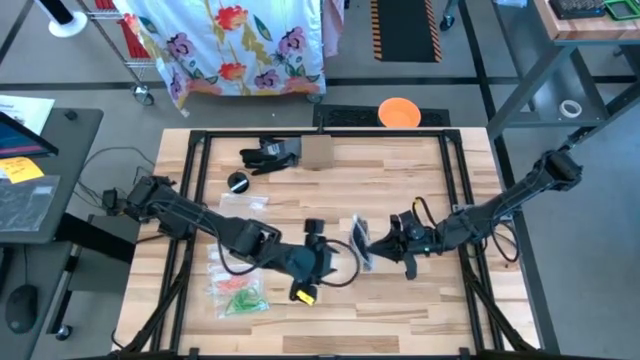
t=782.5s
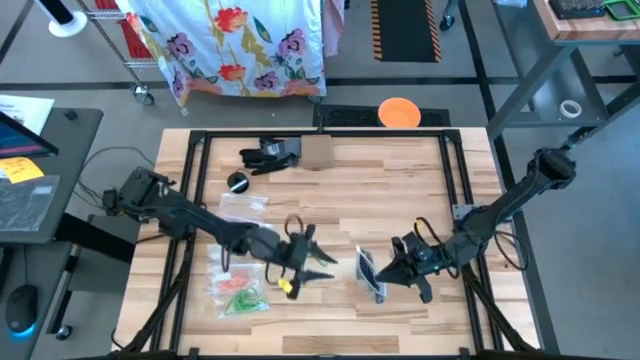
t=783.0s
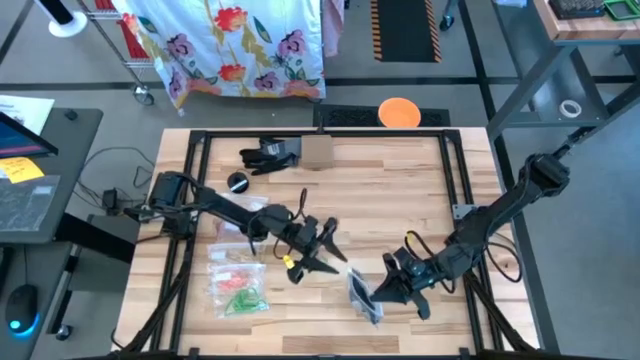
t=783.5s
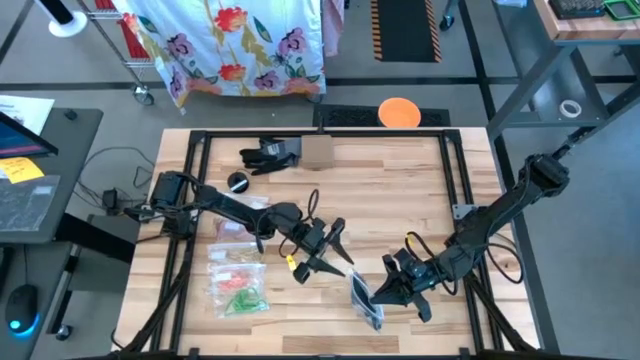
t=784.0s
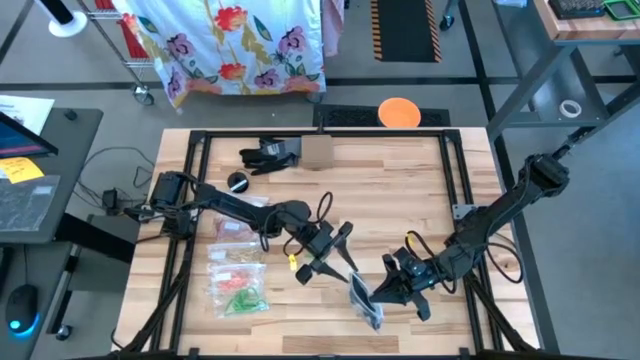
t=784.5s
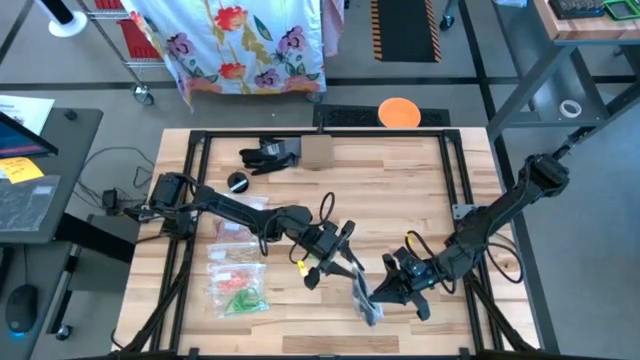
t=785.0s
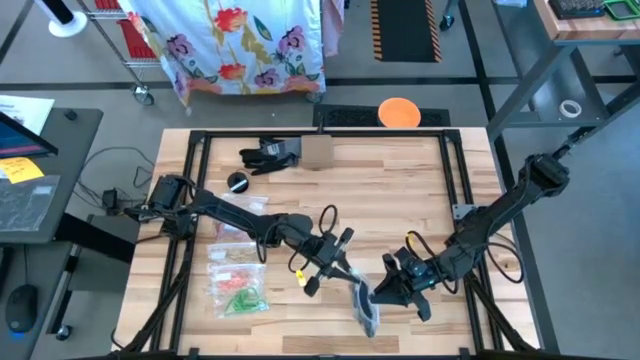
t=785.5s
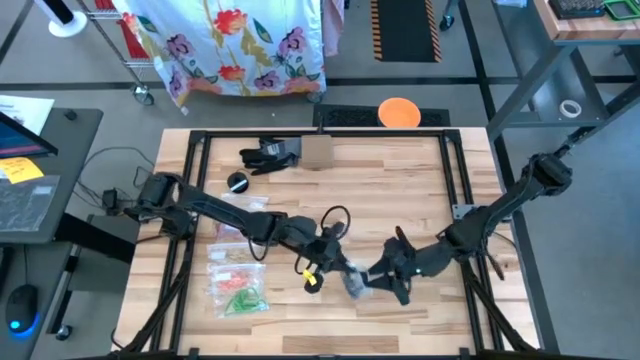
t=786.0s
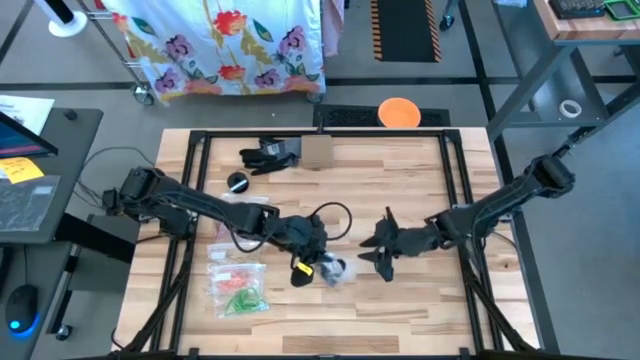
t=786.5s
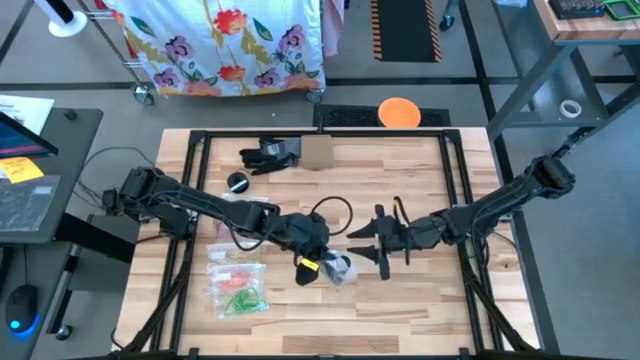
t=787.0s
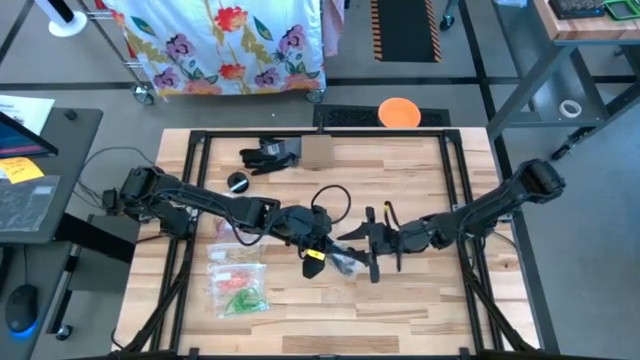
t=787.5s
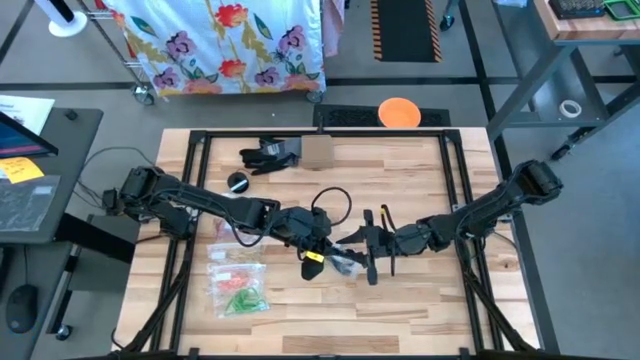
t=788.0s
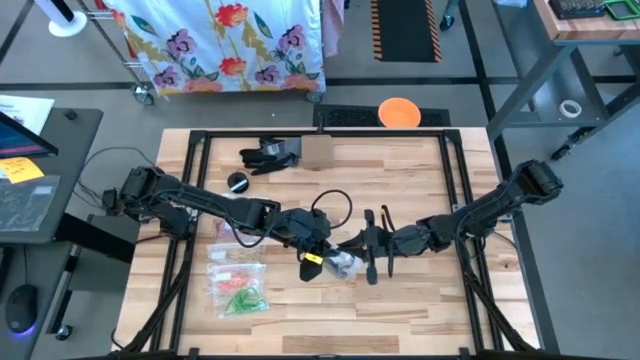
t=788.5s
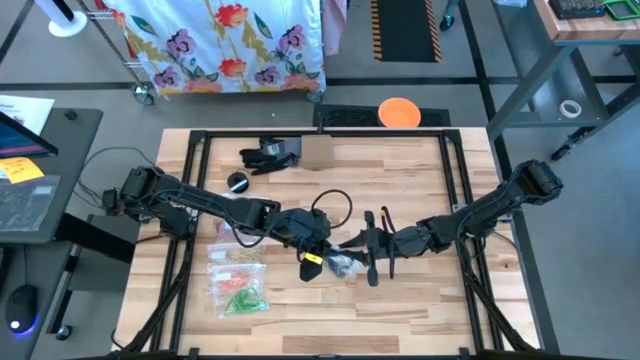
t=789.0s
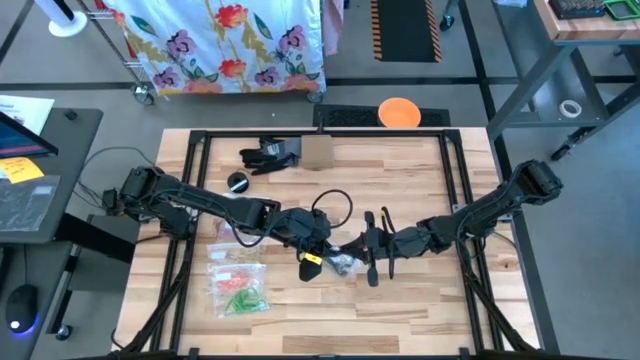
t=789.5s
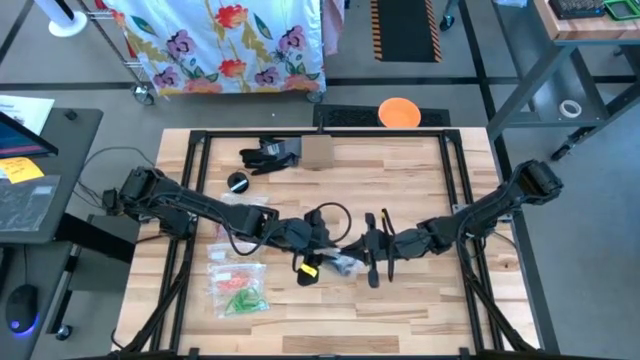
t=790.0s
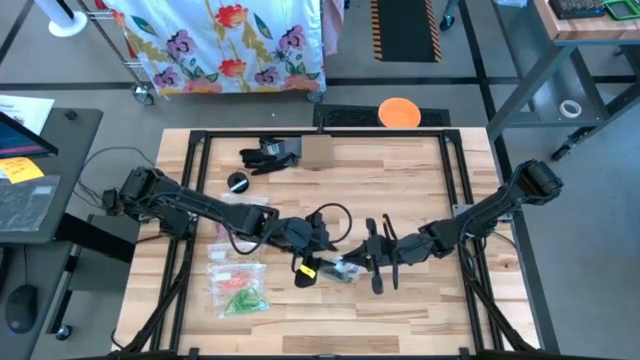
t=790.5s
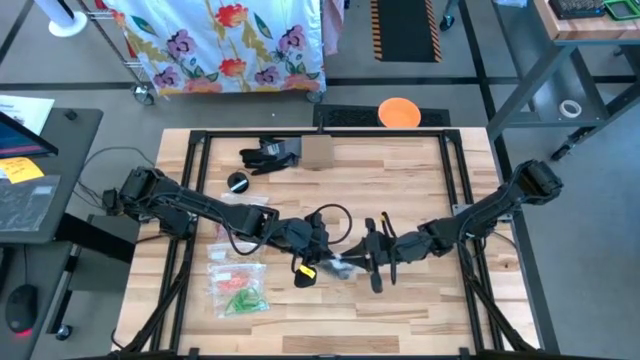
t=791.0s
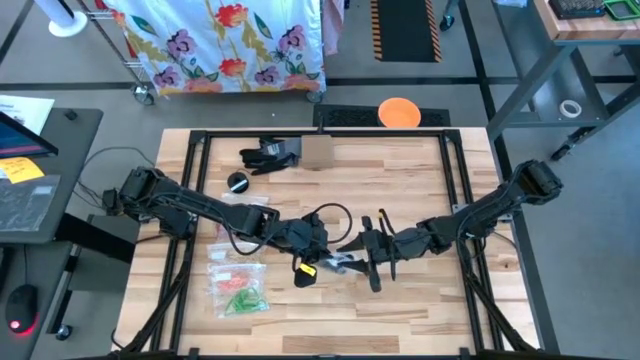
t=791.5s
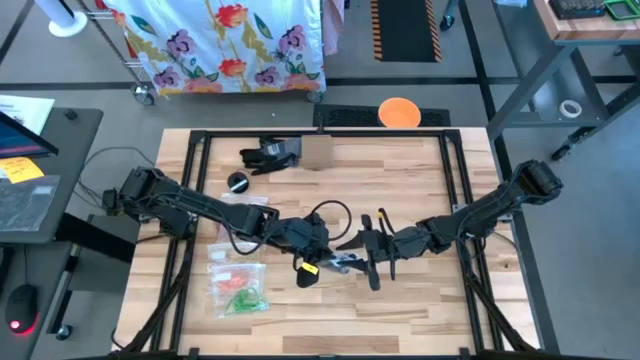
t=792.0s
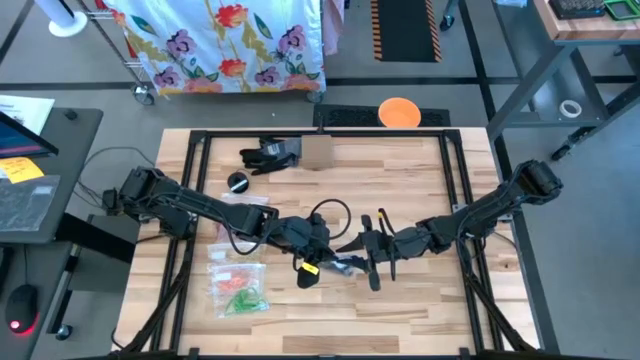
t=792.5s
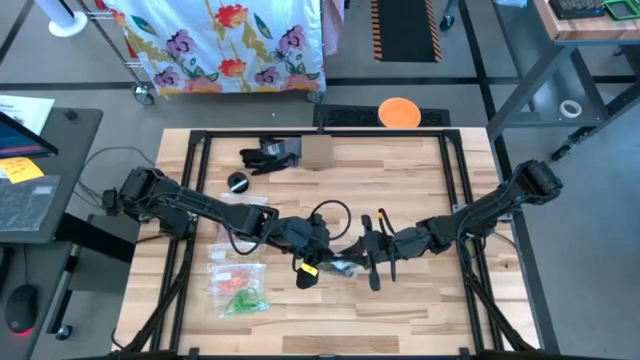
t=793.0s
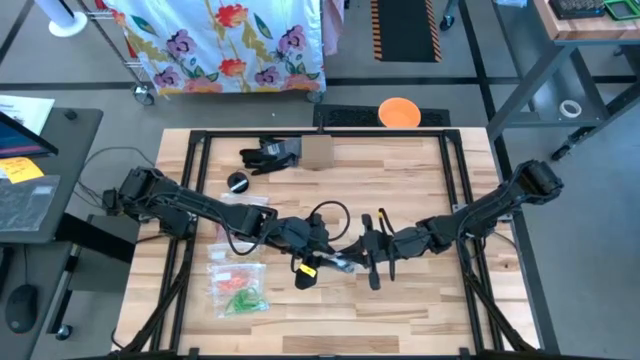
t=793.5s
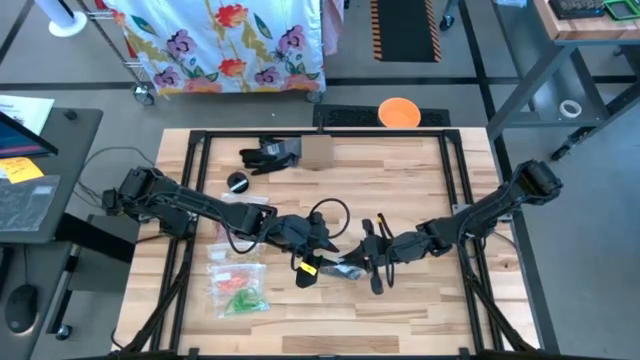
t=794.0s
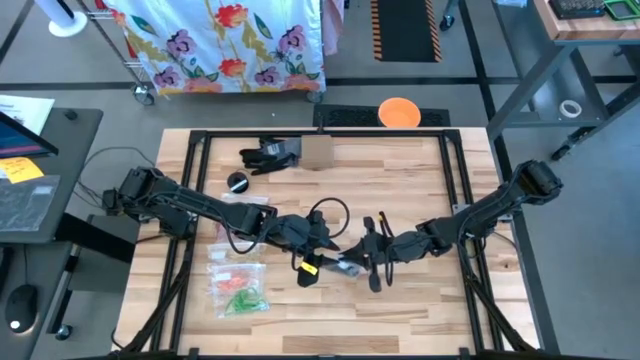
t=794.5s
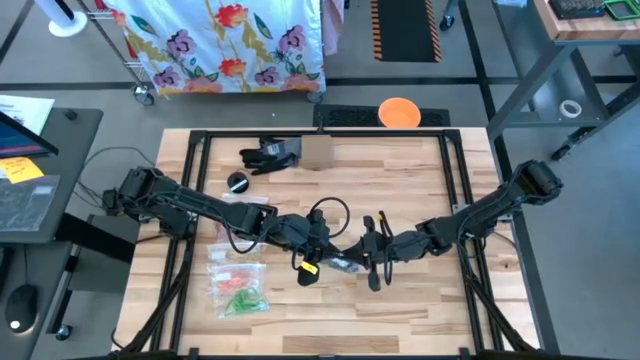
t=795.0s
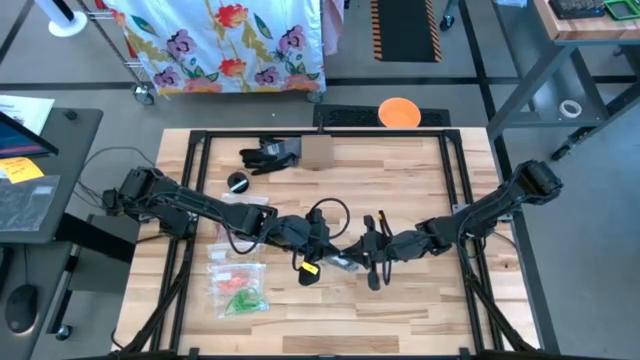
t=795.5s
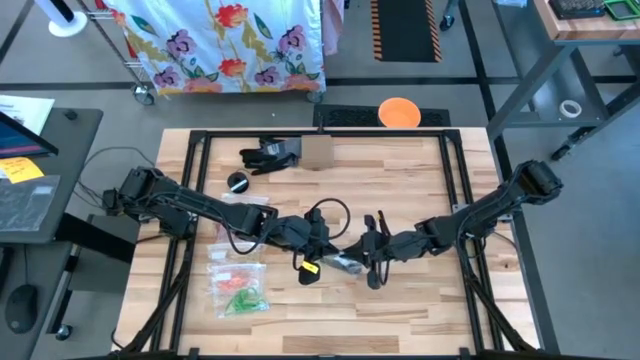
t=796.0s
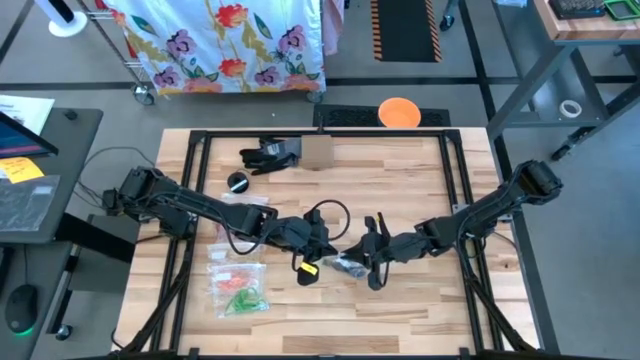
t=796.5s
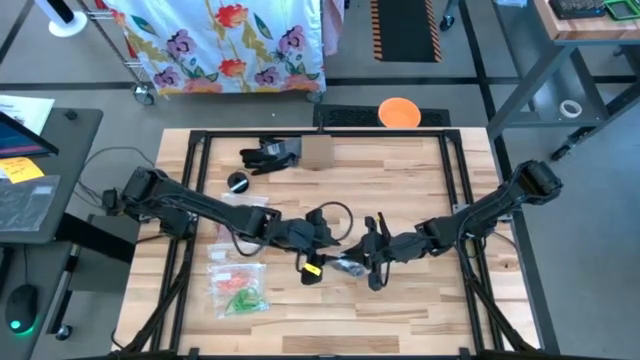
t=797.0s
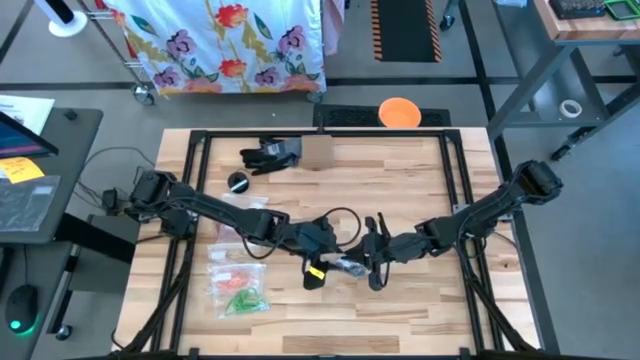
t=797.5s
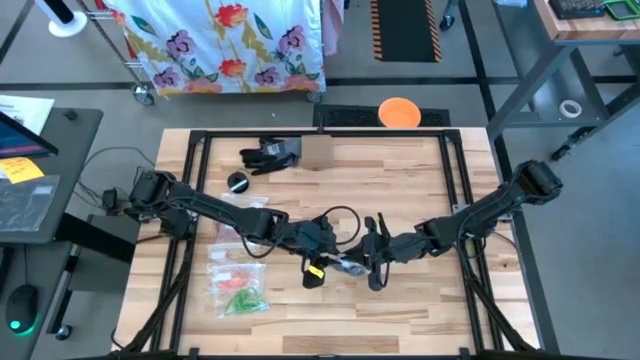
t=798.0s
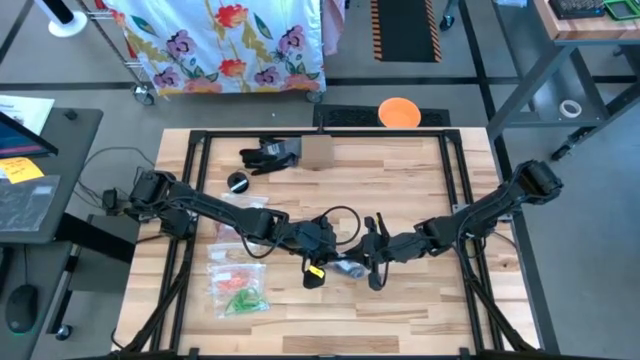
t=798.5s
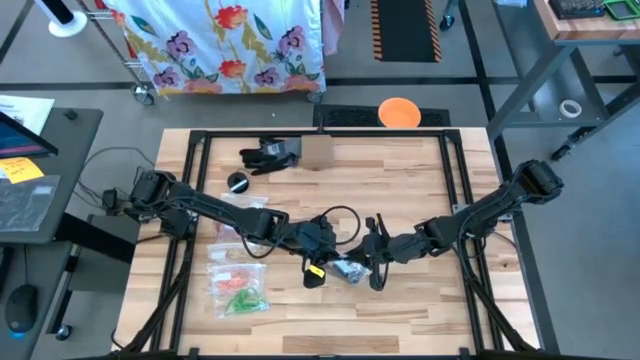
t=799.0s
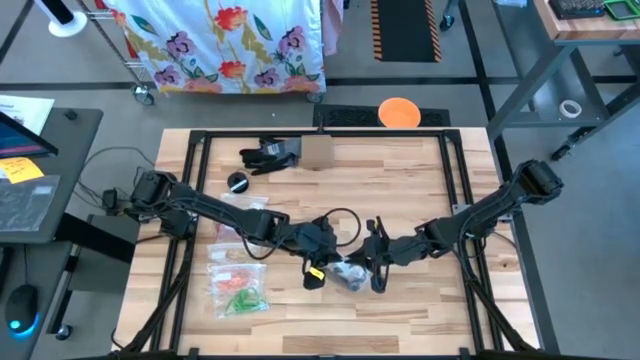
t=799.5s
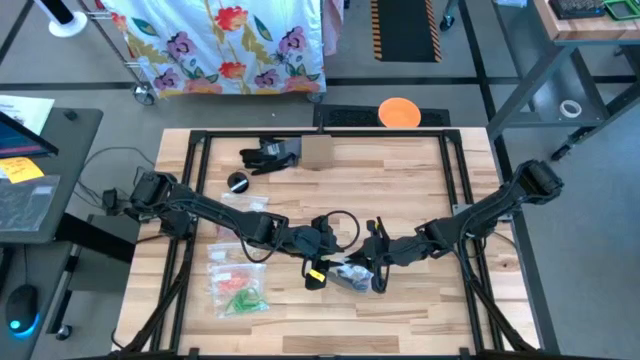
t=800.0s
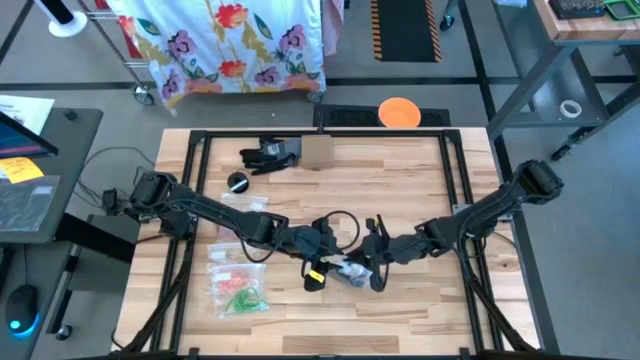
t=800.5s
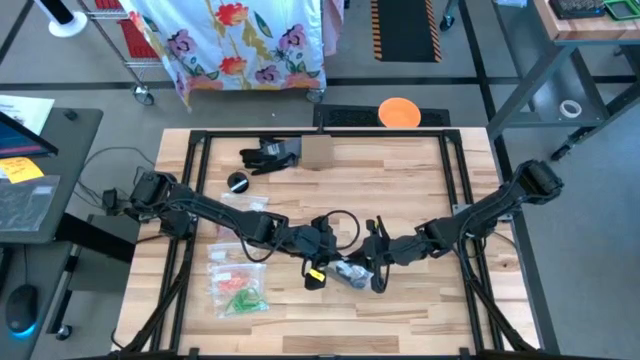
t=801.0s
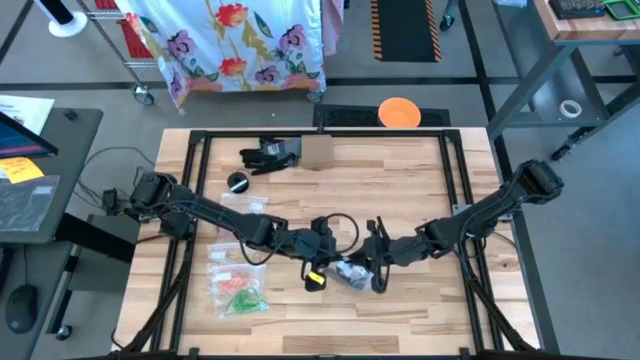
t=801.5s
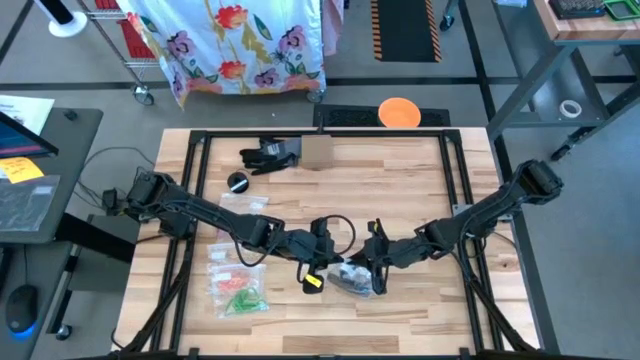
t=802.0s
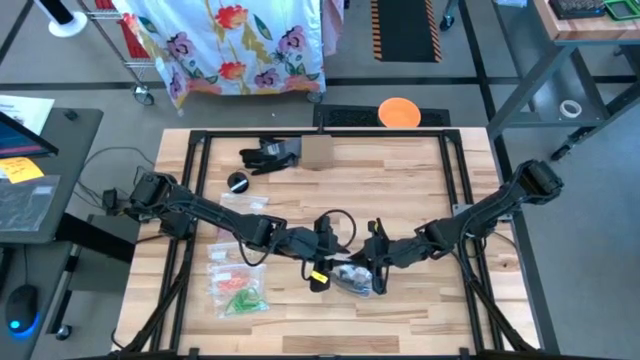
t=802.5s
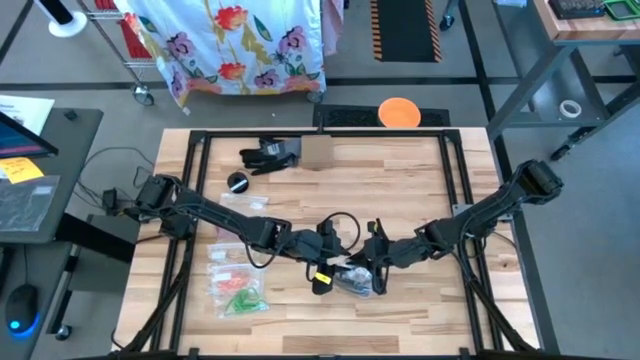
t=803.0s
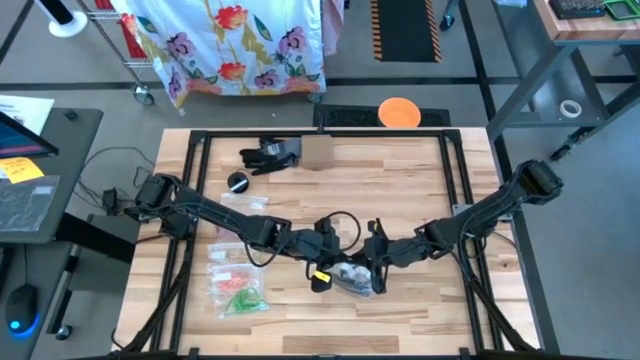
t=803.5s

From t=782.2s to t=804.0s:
Task: Sort rubber bands
Close the transparent zip bag
